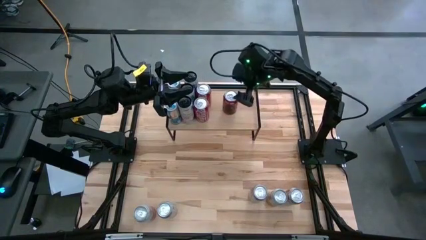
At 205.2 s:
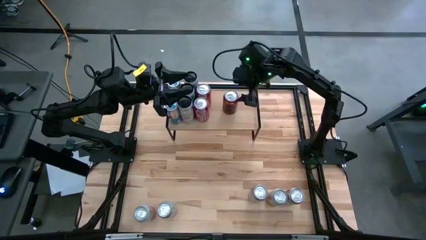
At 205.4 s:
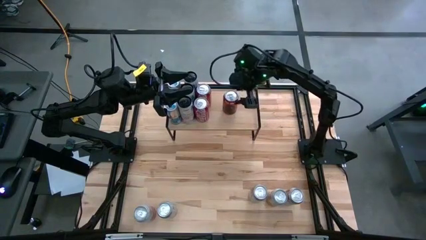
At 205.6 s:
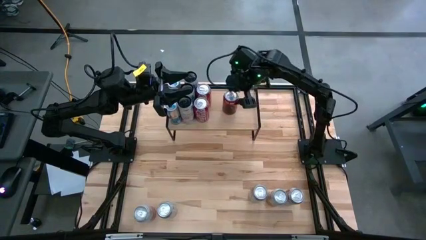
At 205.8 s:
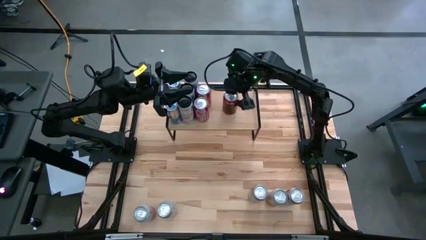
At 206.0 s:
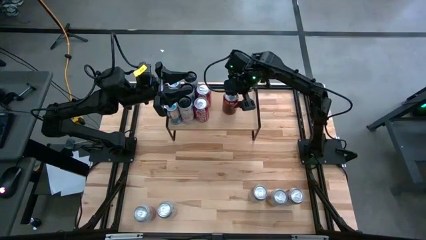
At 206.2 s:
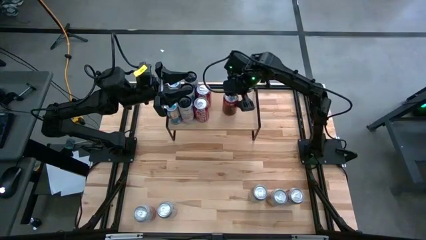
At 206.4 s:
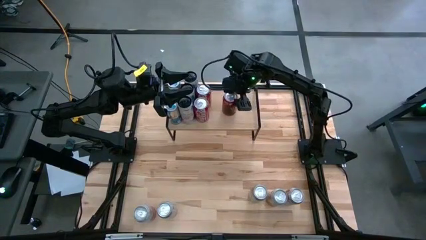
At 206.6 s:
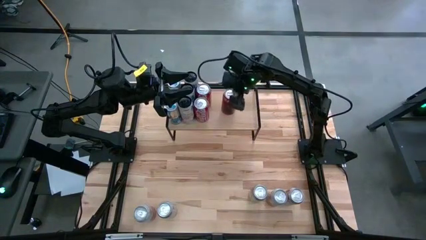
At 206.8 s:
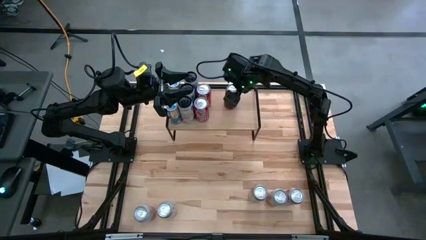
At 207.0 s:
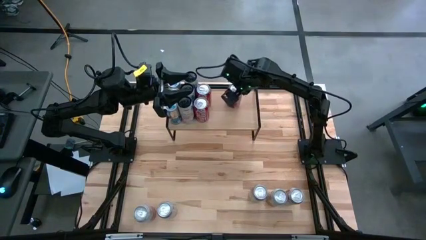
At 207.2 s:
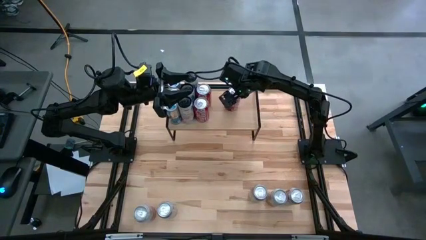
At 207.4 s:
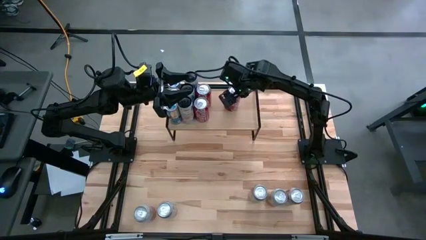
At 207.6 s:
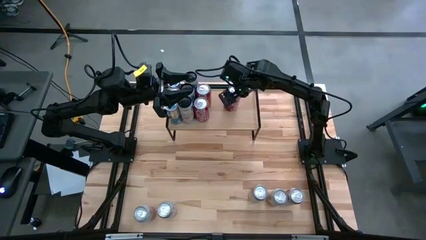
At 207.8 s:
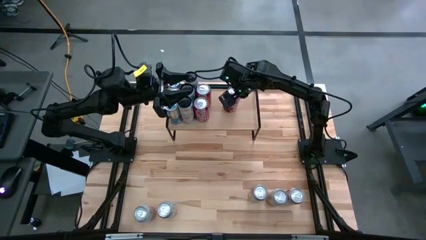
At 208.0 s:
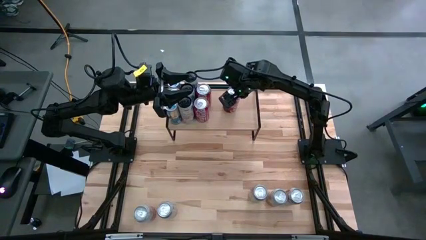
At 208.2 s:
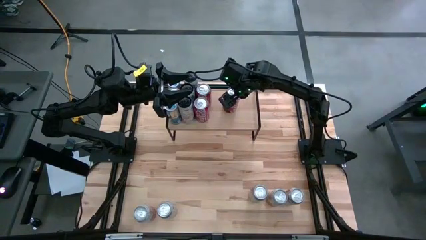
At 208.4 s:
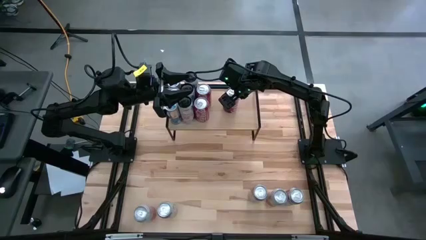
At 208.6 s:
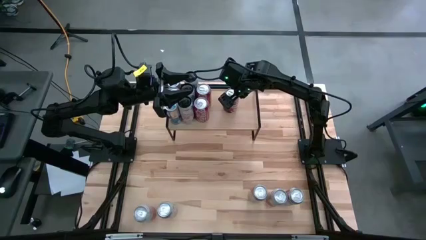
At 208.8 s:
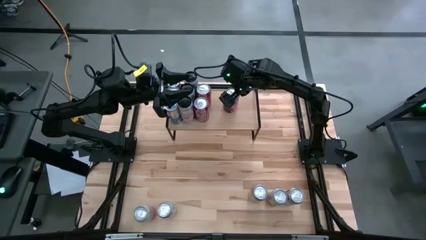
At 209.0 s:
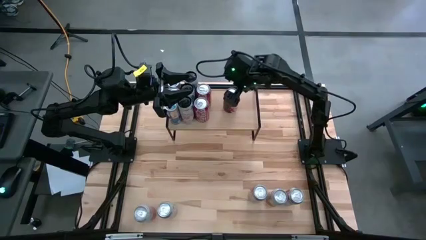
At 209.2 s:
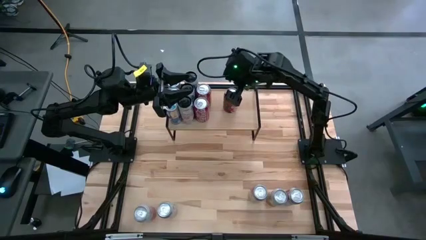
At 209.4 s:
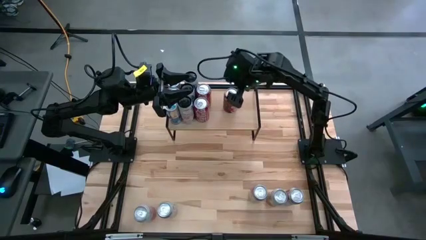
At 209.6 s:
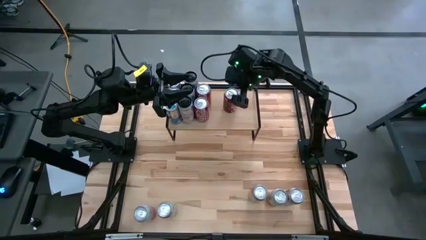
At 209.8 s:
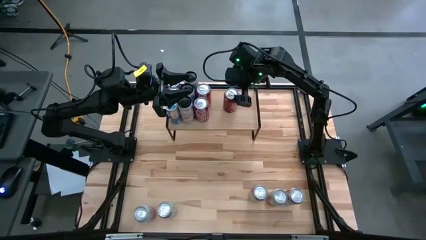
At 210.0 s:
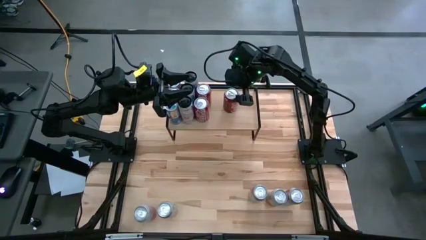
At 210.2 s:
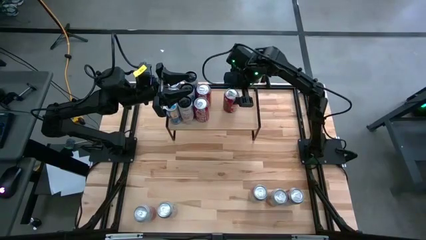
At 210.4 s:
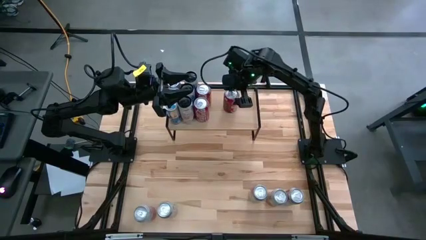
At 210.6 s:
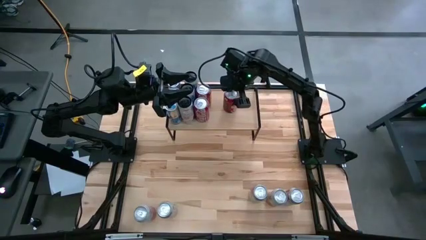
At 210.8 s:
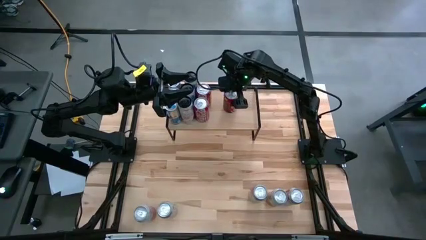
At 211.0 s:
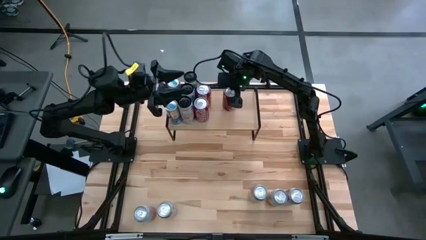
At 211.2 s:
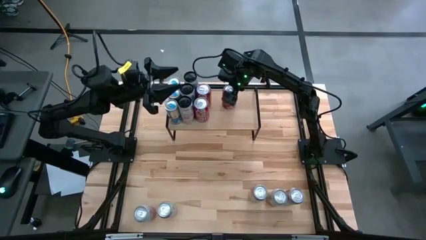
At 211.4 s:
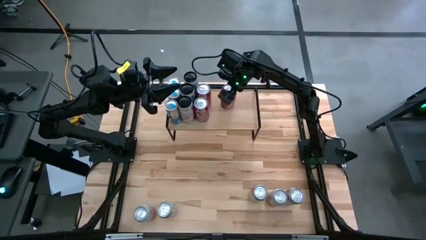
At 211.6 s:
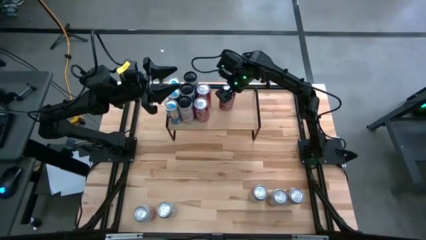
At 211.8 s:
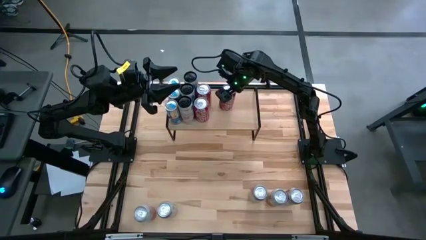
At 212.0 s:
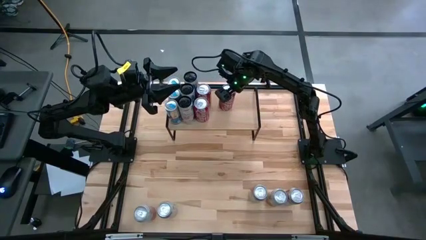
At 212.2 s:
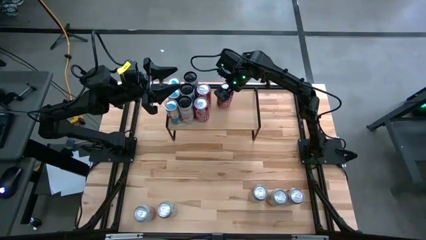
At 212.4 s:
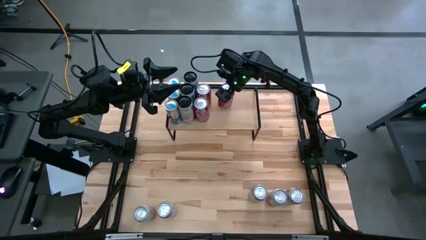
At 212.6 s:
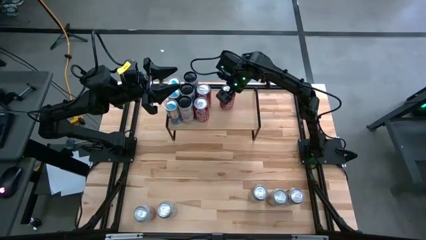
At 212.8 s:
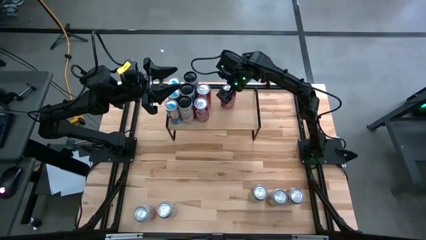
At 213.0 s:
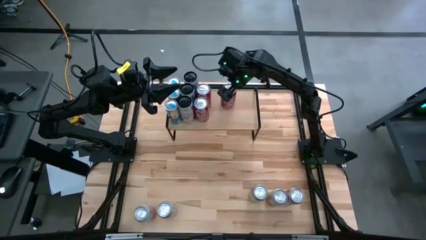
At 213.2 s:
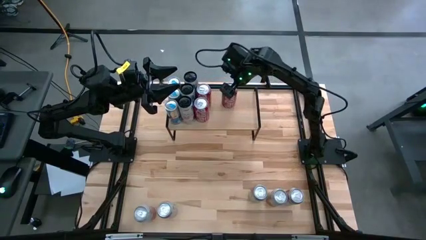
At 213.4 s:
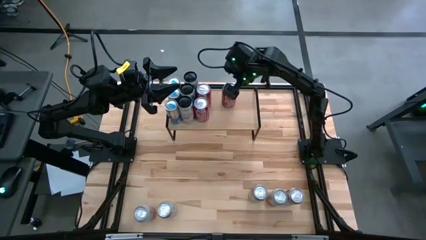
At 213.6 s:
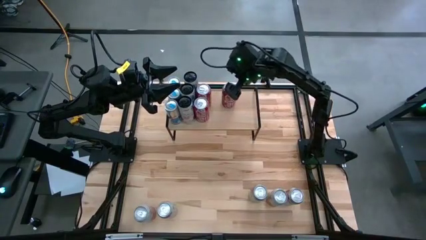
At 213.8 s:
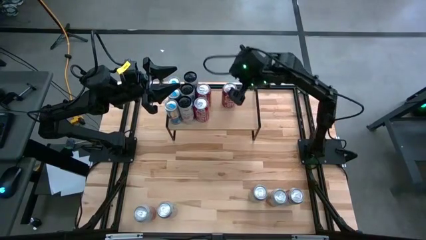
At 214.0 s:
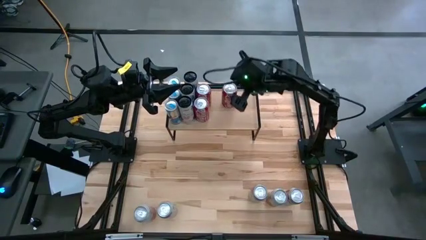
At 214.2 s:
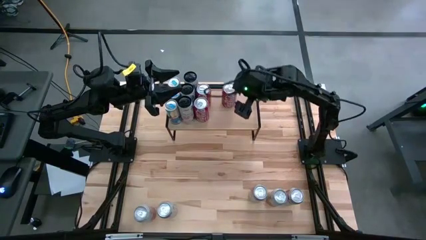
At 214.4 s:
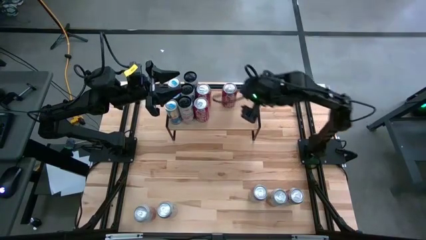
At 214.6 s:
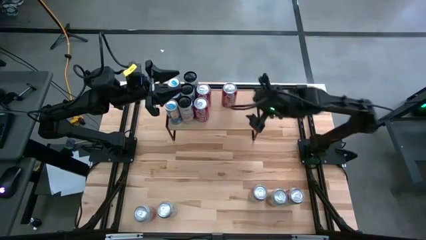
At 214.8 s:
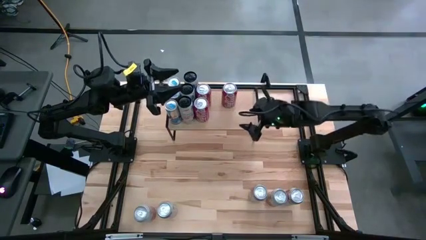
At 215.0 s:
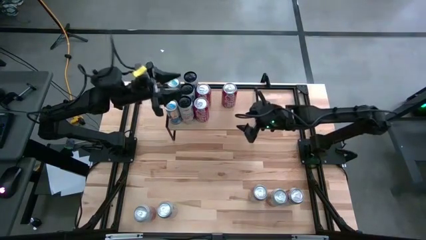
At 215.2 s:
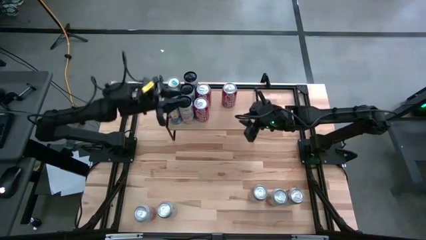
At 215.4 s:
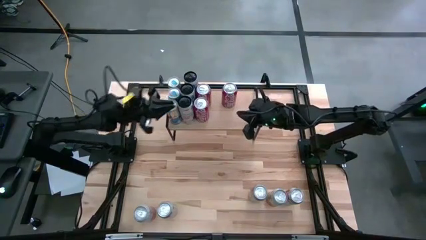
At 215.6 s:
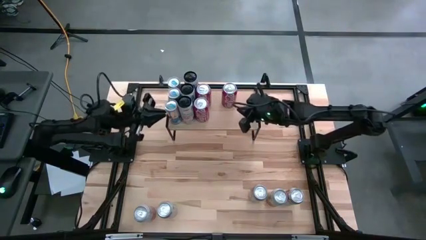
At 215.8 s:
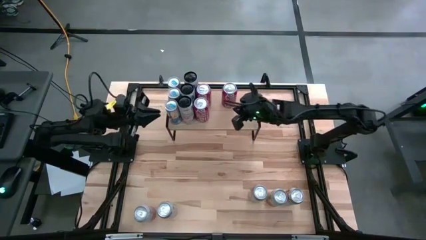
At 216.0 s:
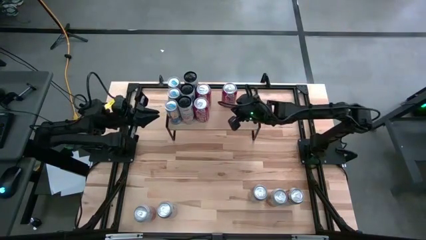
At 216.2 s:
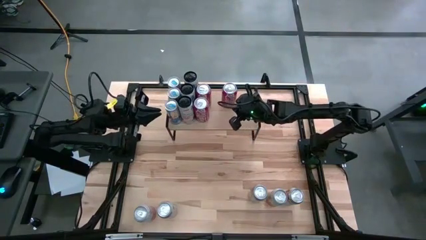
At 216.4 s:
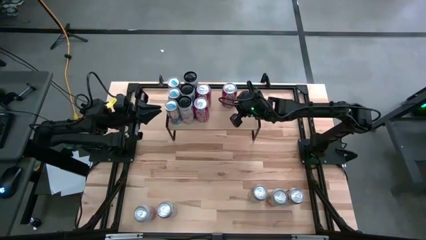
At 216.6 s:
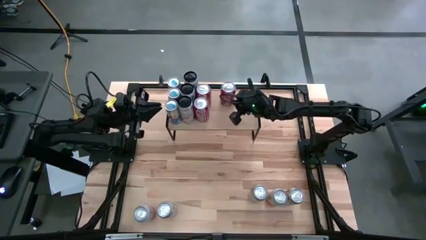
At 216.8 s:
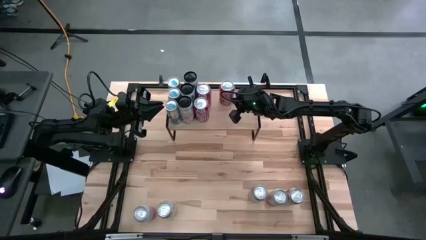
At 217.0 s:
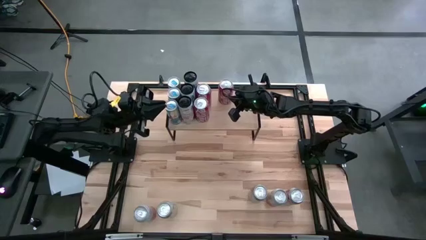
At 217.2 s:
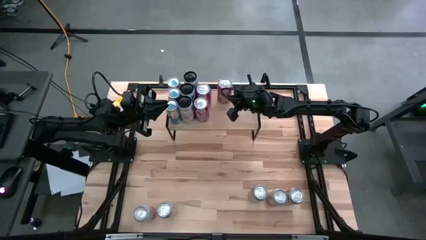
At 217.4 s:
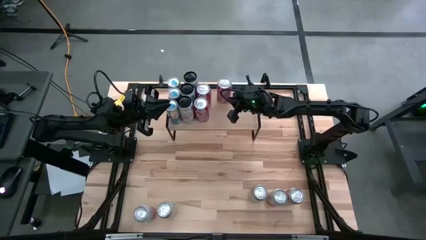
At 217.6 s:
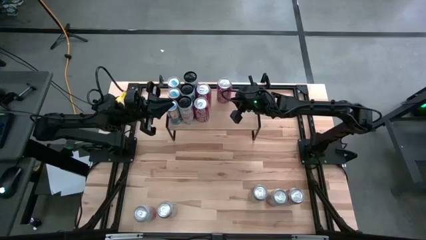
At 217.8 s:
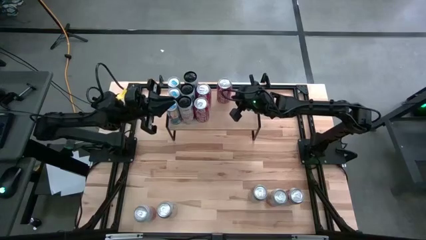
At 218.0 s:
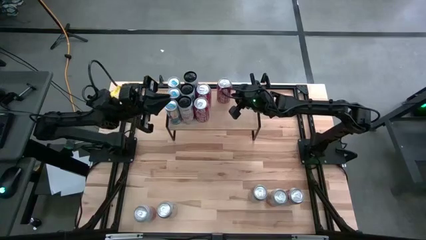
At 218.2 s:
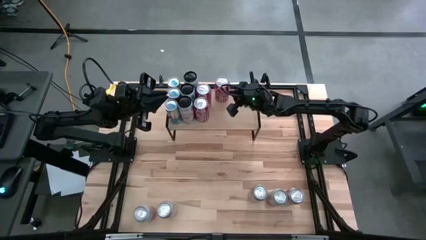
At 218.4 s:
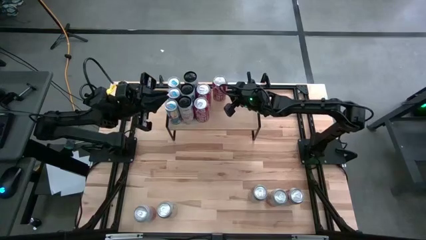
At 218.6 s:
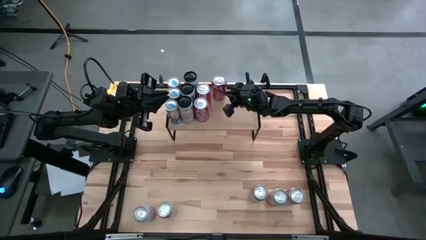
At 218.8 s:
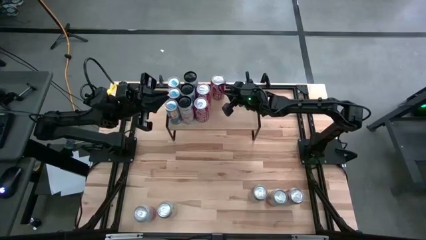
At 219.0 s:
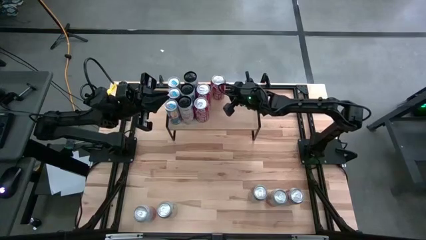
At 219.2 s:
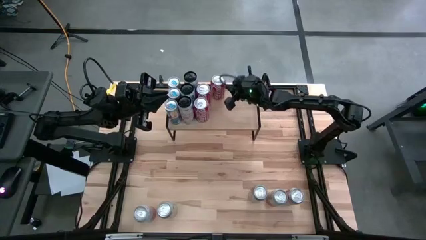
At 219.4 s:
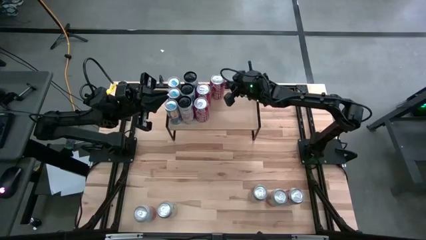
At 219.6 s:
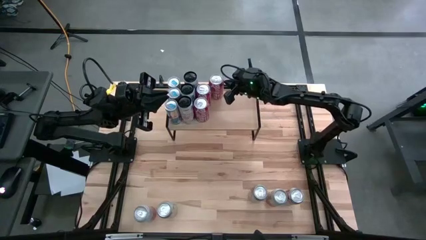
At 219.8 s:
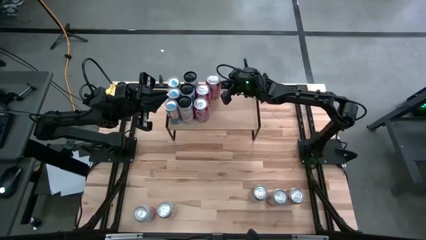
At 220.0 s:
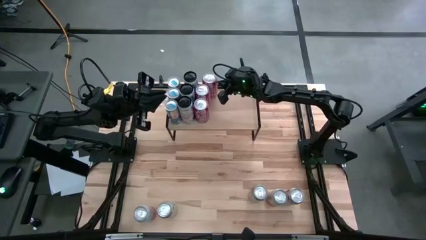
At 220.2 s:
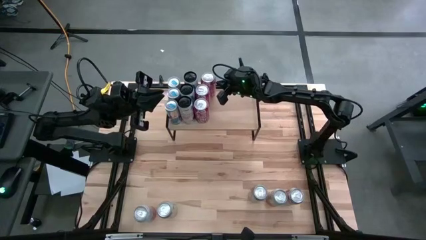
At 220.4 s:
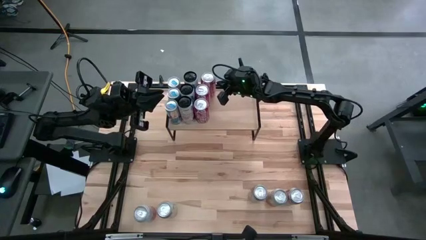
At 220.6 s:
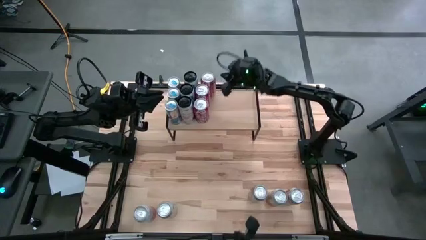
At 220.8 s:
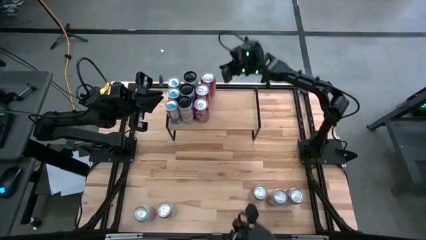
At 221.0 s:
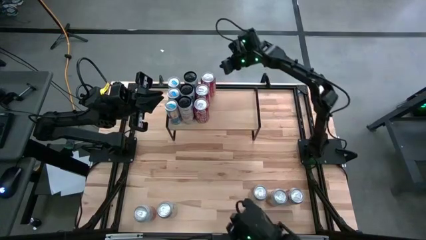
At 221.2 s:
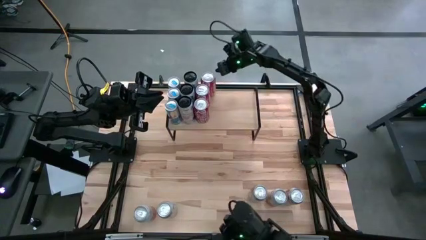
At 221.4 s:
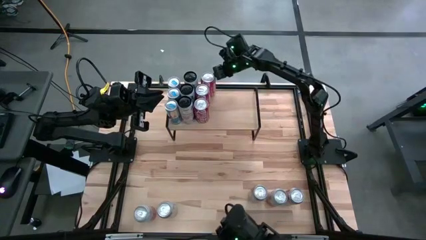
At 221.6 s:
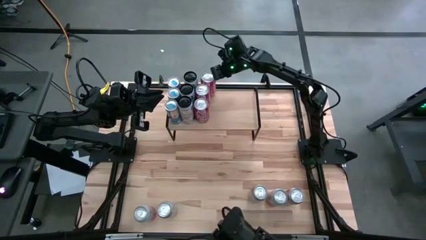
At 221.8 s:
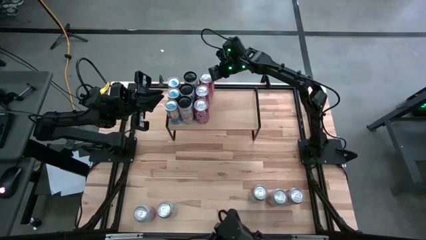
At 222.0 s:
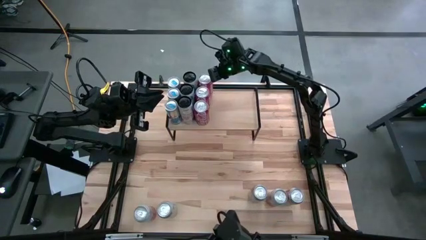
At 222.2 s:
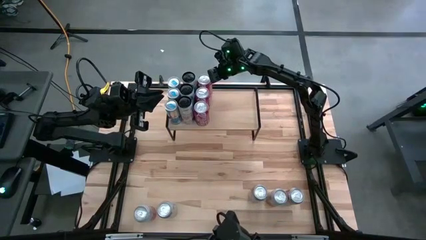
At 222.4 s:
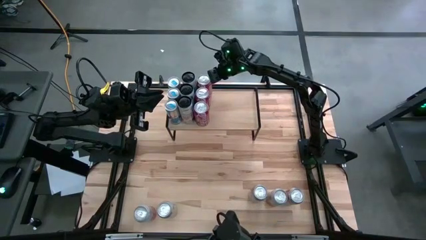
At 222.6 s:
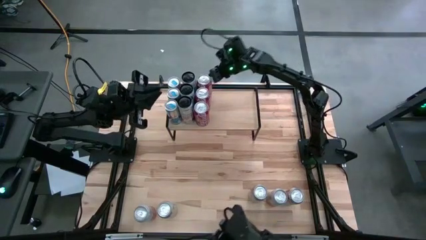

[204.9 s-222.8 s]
Task: Place canned beverage on shelf
Put the red-white soda can aligned with the other red-white soda cans on the shelf
